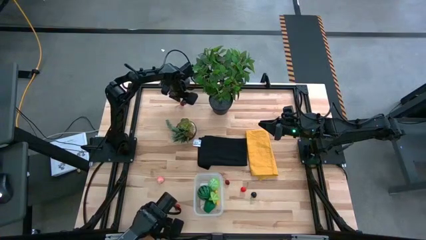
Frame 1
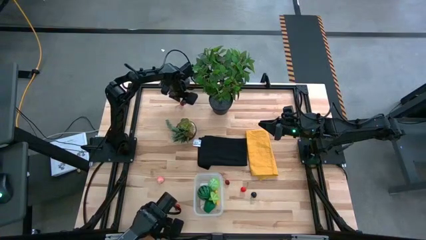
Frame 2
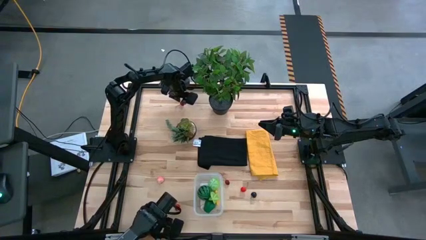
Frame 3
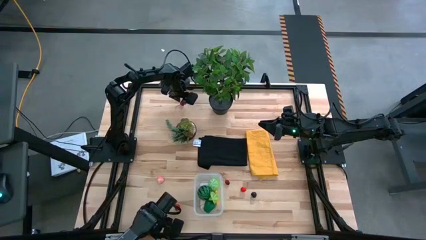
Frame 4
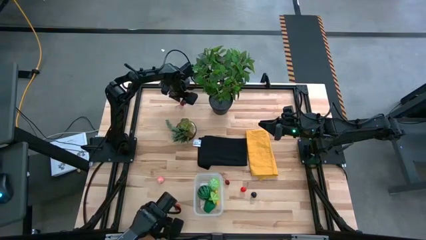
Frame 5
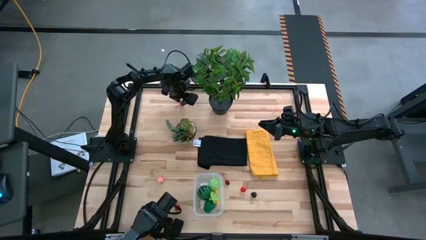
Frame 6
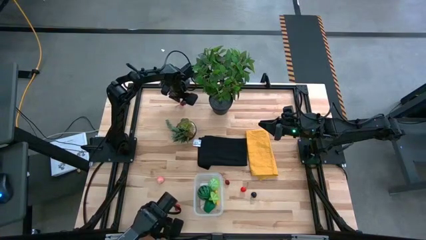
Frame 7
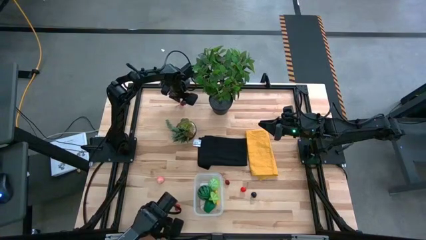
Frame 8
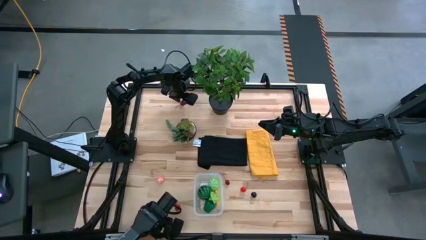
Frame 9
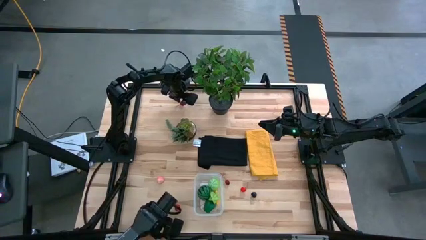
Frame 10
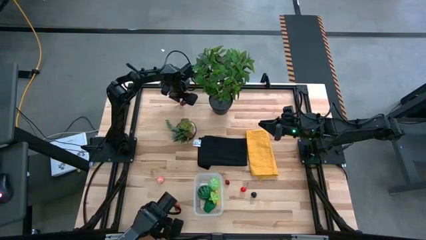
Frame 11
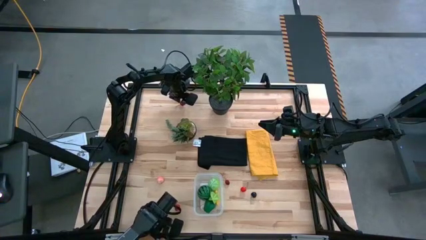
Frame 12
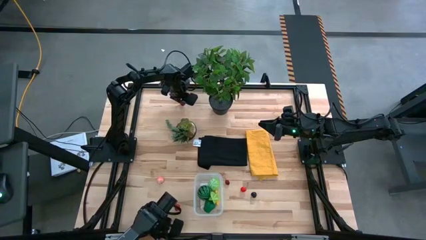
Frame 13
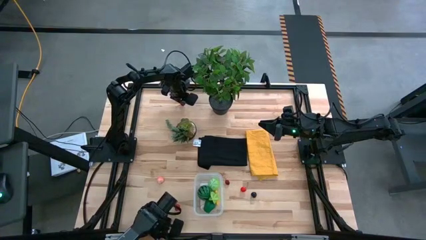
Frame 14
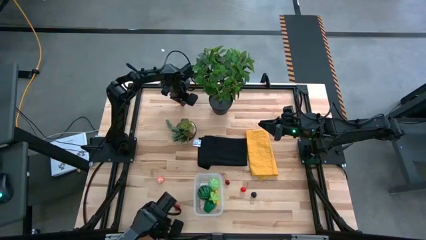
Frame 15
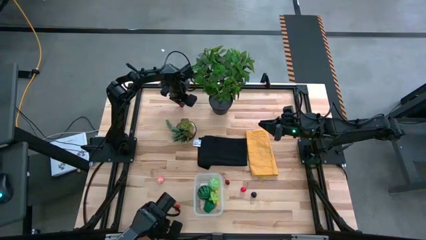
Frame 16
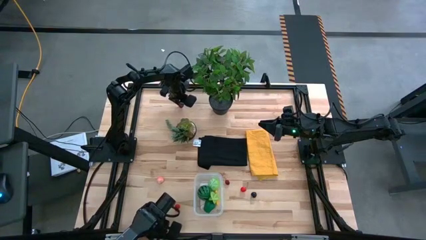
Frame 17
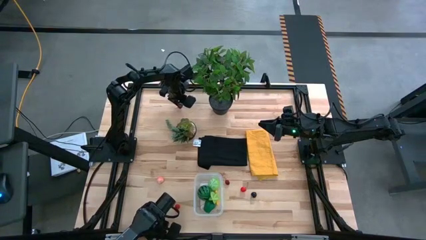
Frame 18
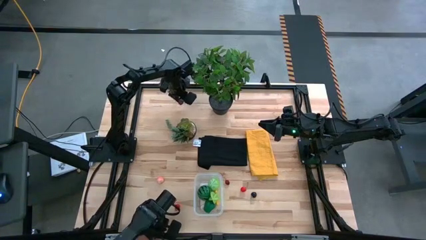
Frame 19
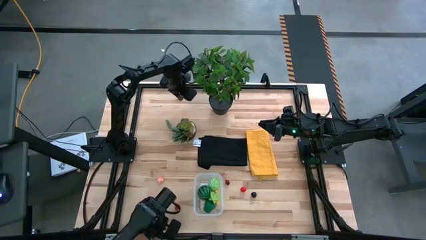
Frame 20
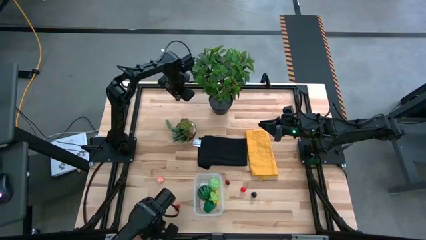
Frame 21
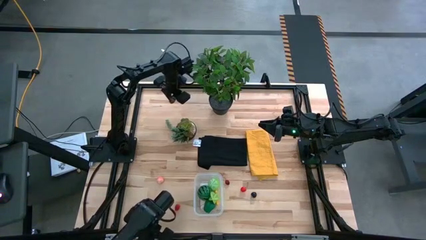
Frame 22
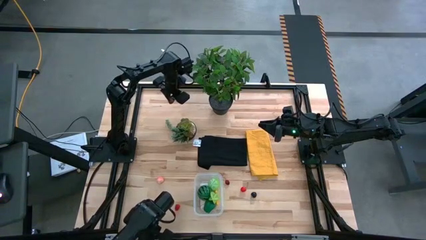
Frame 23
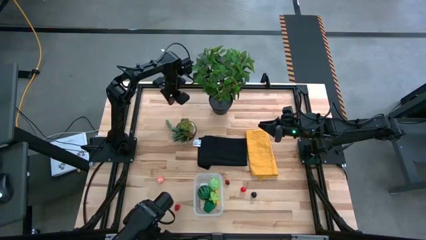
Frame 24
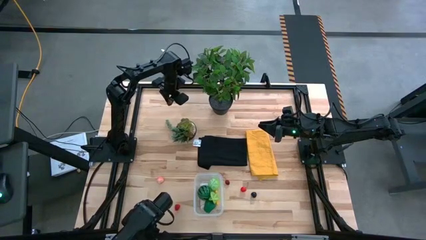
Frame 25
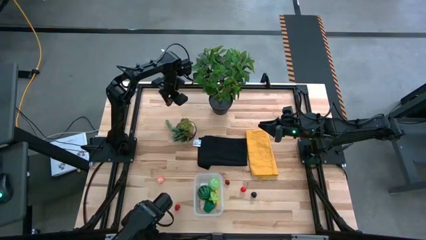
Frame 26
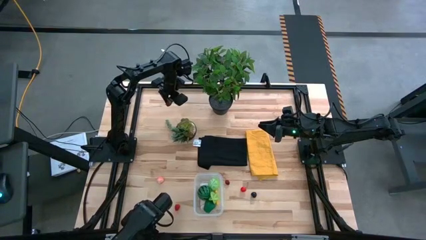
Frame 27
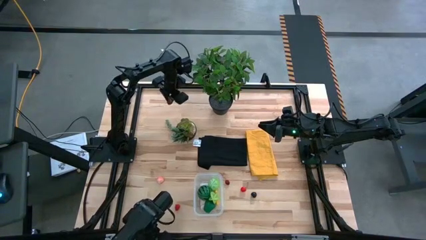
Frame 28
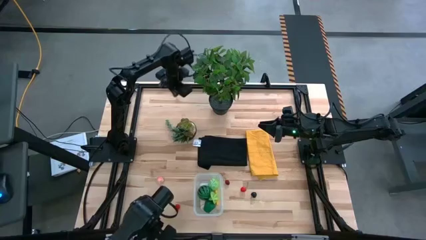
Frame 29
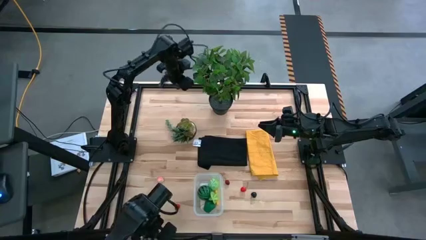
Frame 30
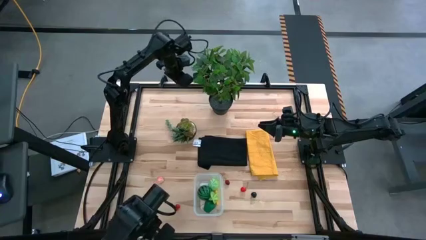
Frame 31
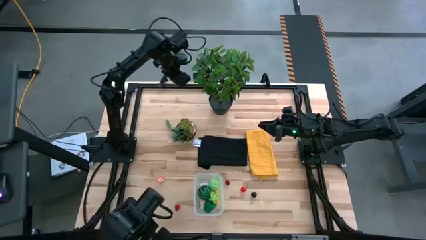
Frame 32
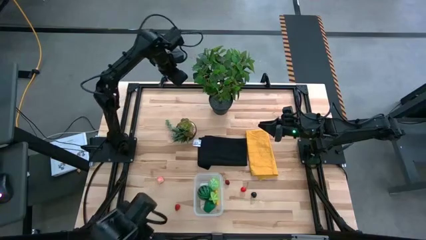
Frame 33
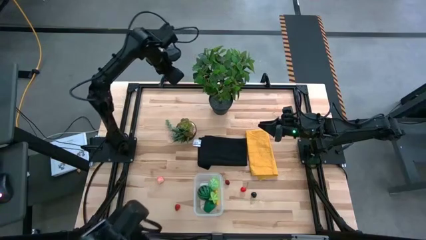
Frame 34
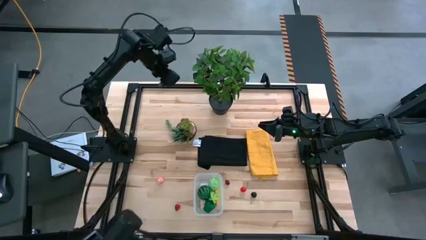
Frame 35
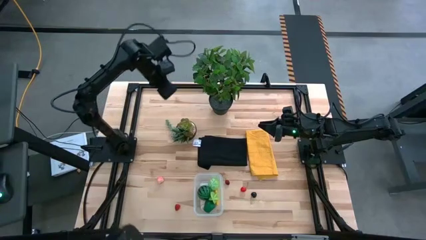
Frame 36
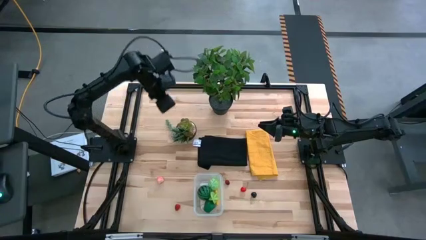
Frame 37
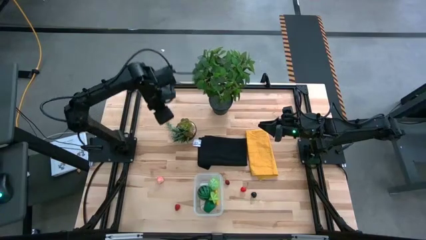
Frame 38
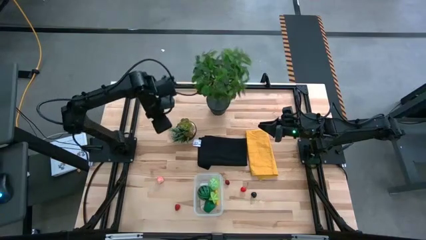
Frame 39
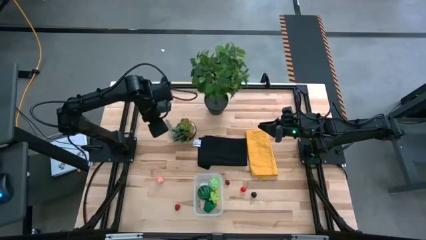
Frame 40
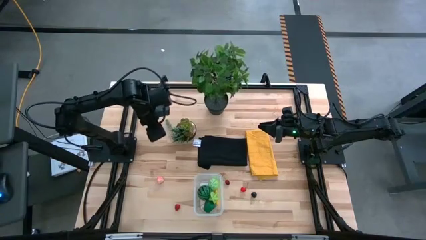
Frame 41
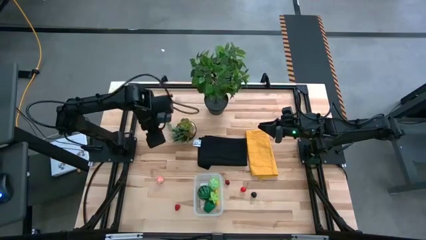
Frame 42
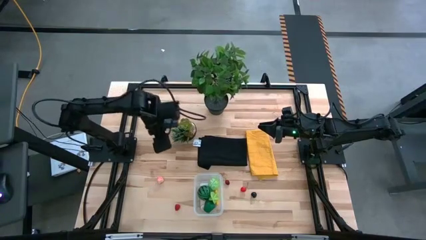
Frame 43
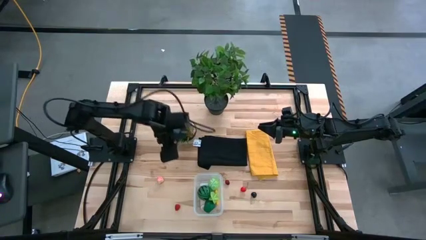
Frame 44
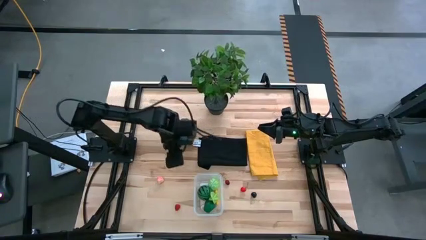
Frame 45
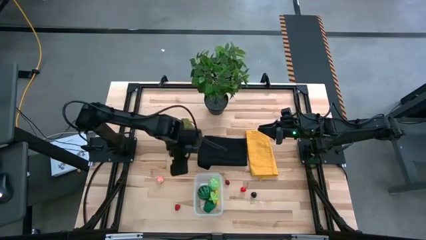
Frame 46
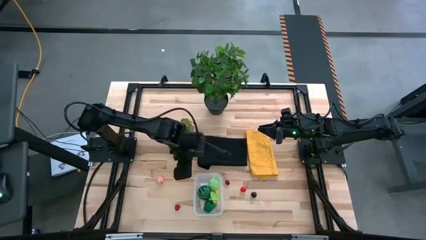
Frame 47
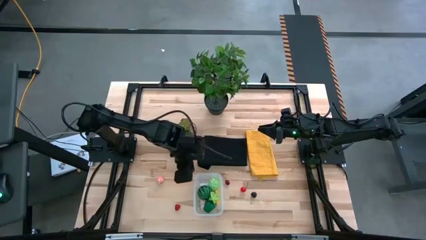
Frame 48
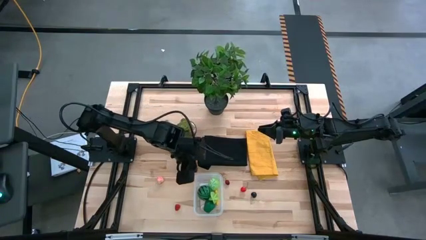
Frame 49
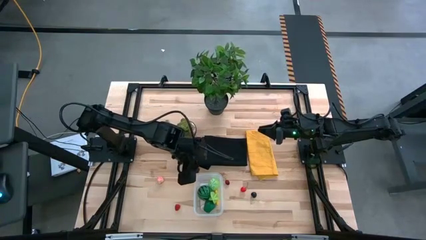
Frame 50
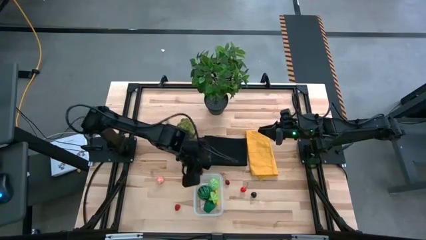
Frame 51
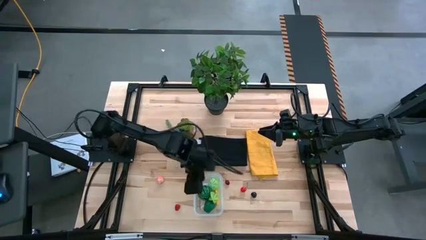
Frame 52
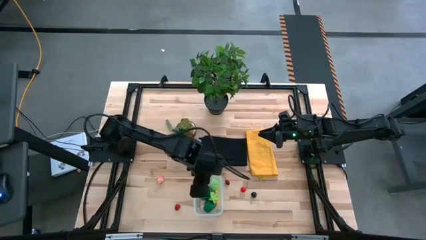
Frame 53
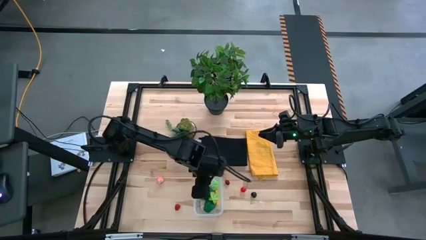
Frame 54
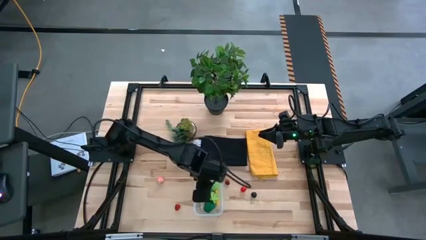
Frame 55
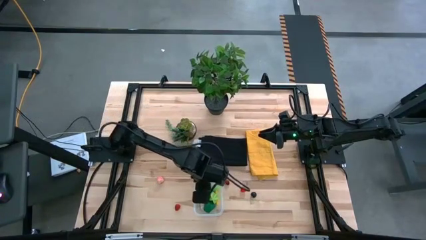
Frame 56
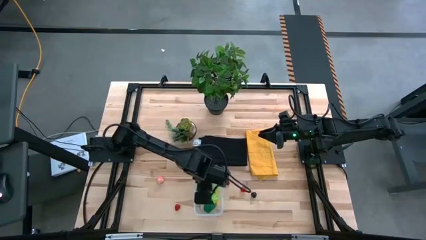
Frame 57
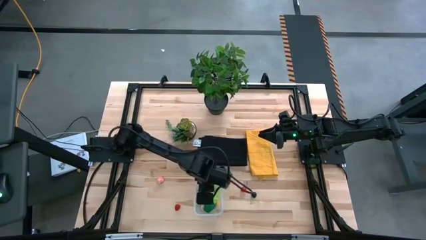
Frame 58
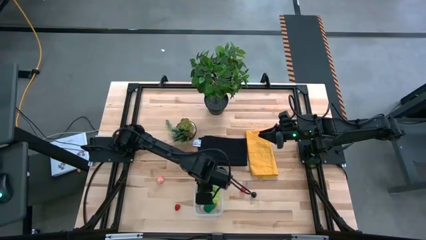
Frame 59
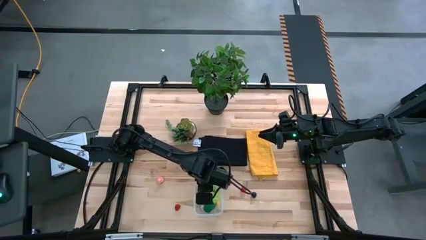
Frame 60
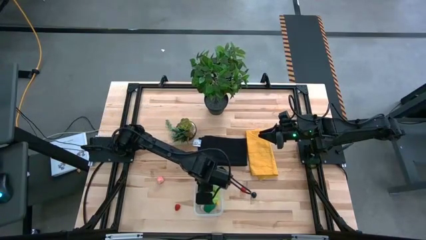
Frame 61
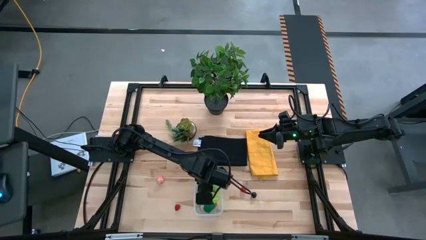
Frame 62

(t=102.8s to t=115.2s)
Task: Pick and placing Produce into tupperware
Put the top red cherry into the bin
